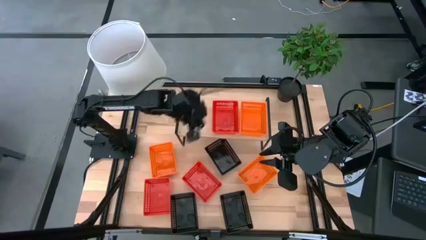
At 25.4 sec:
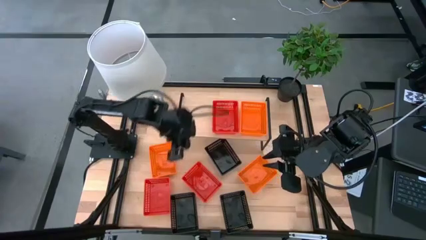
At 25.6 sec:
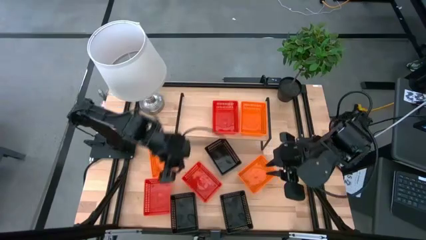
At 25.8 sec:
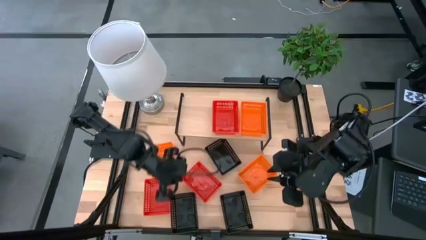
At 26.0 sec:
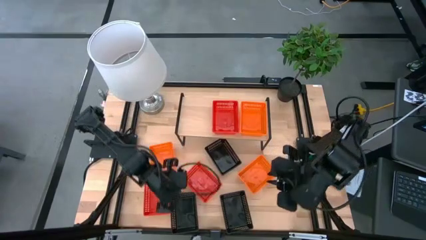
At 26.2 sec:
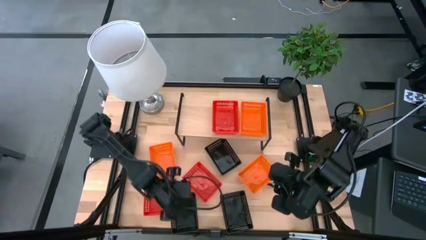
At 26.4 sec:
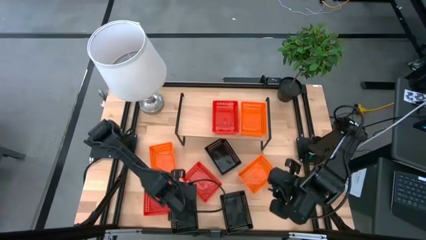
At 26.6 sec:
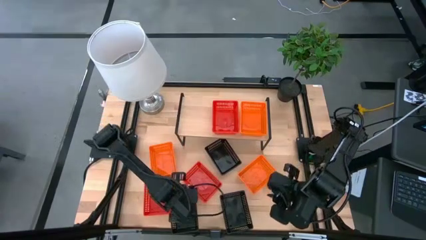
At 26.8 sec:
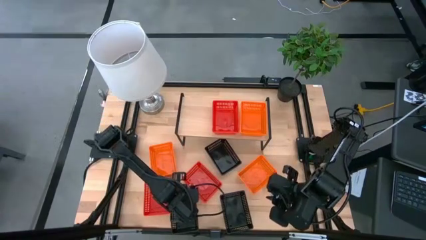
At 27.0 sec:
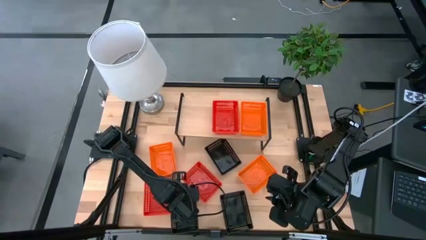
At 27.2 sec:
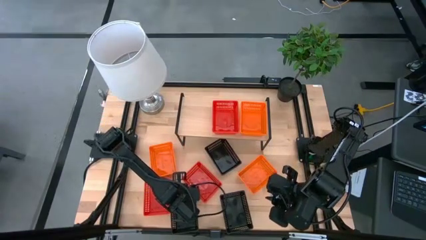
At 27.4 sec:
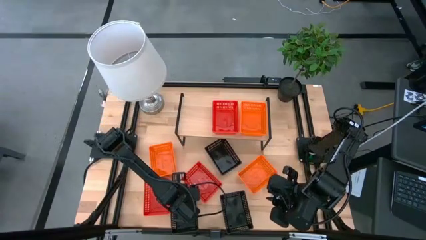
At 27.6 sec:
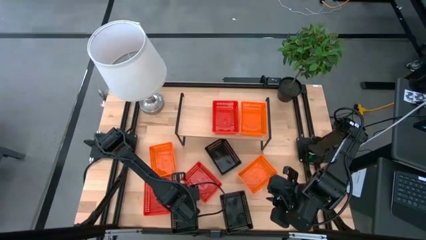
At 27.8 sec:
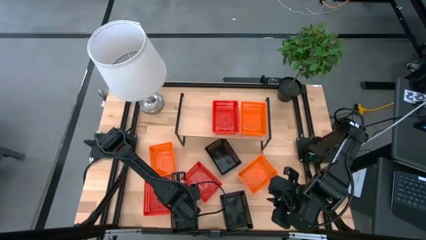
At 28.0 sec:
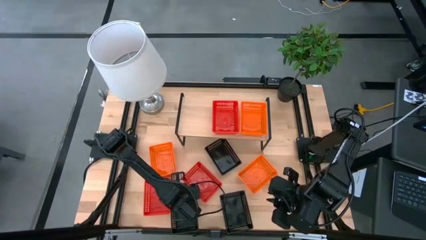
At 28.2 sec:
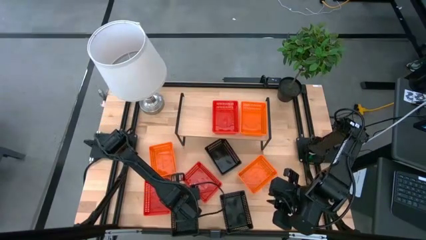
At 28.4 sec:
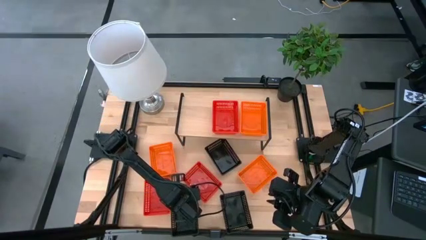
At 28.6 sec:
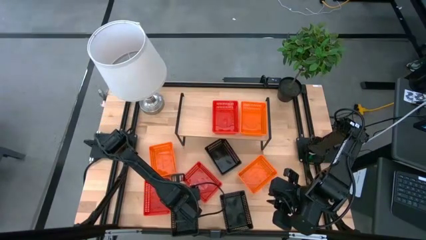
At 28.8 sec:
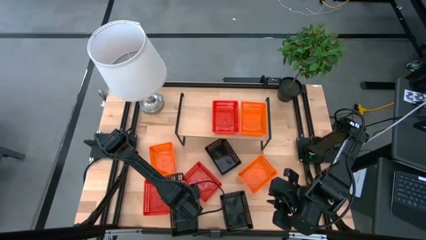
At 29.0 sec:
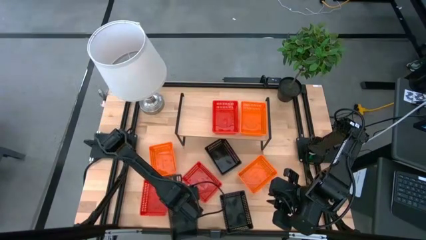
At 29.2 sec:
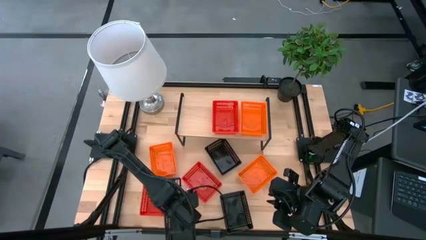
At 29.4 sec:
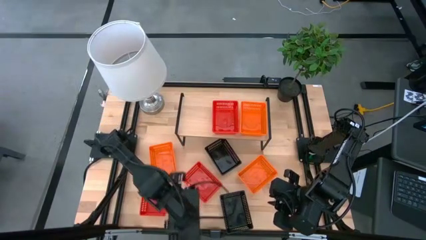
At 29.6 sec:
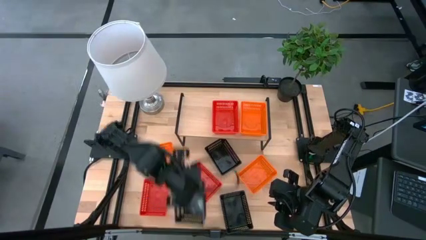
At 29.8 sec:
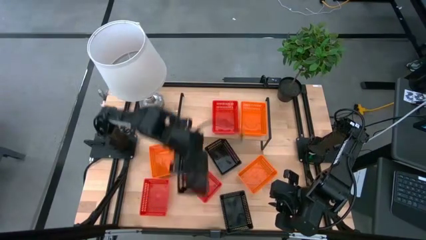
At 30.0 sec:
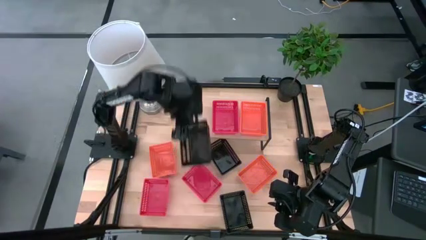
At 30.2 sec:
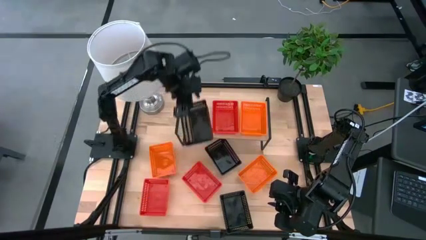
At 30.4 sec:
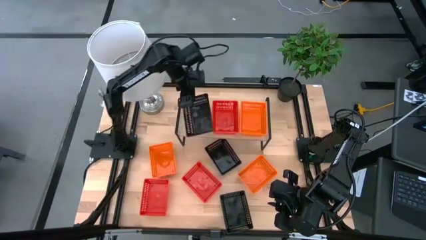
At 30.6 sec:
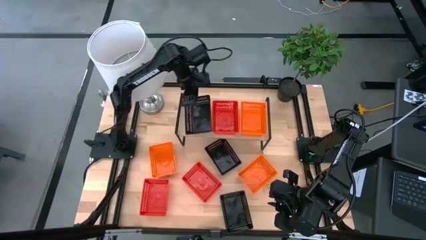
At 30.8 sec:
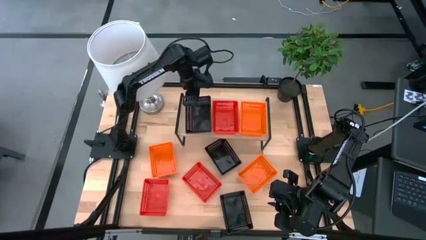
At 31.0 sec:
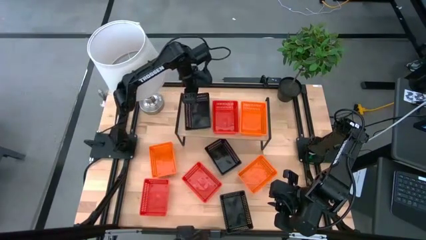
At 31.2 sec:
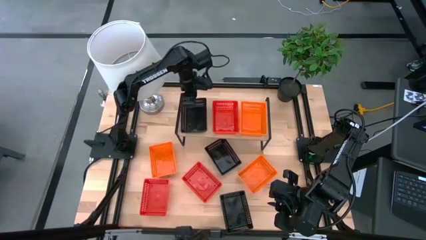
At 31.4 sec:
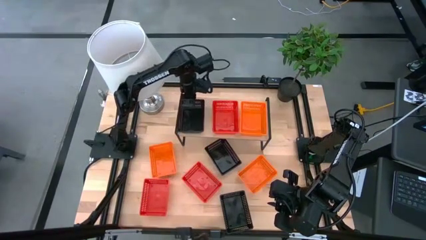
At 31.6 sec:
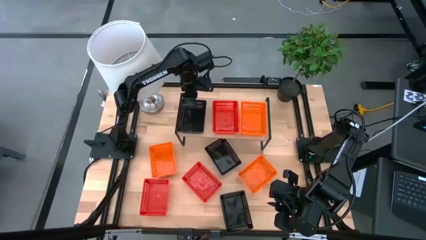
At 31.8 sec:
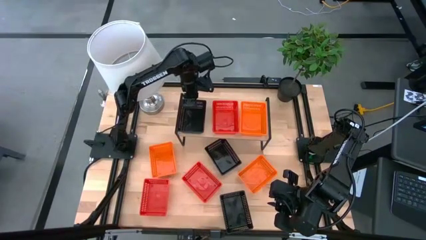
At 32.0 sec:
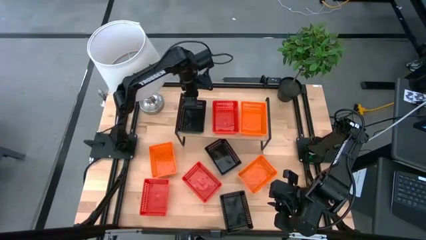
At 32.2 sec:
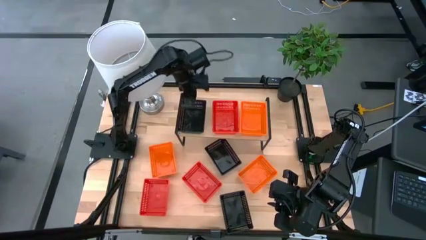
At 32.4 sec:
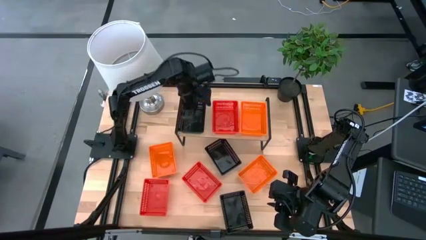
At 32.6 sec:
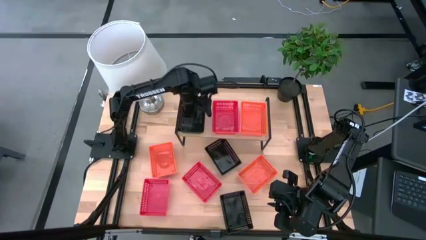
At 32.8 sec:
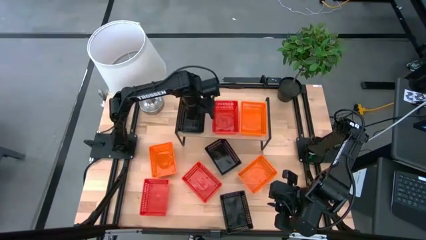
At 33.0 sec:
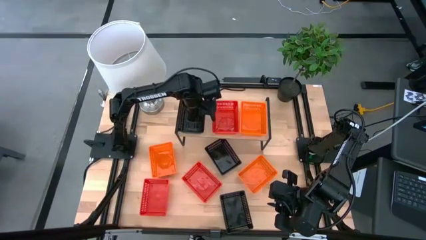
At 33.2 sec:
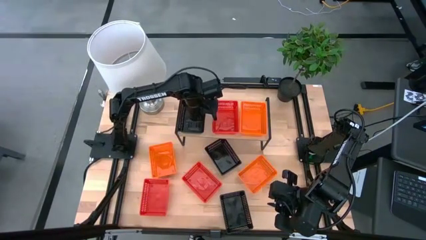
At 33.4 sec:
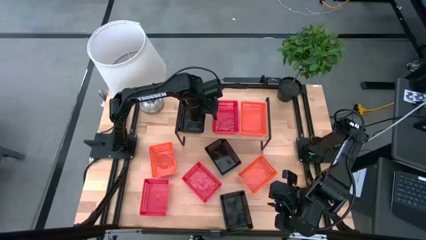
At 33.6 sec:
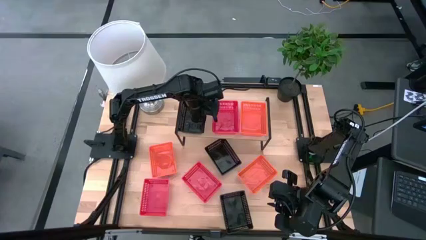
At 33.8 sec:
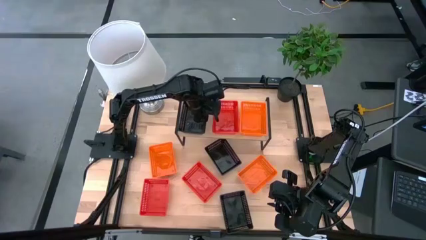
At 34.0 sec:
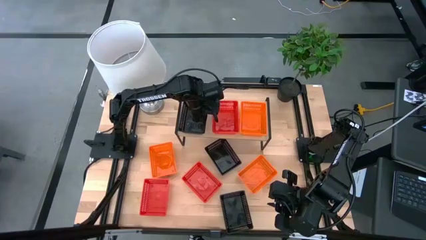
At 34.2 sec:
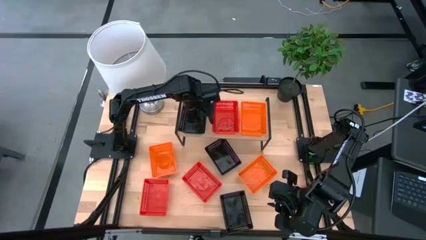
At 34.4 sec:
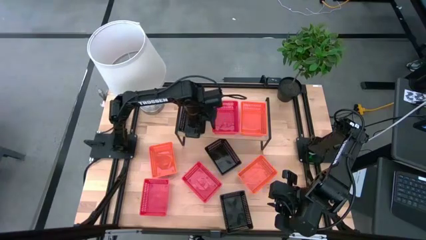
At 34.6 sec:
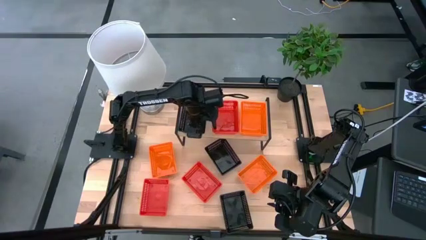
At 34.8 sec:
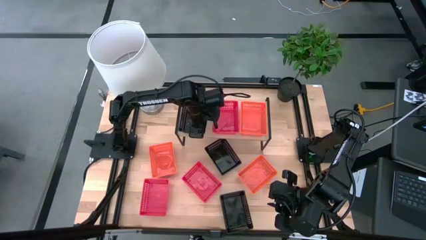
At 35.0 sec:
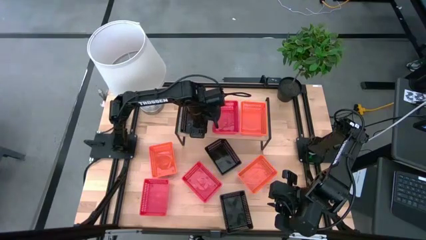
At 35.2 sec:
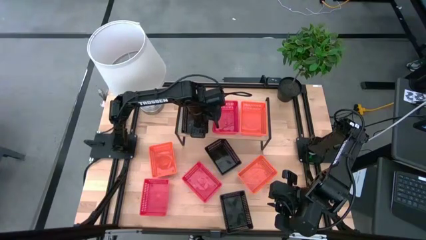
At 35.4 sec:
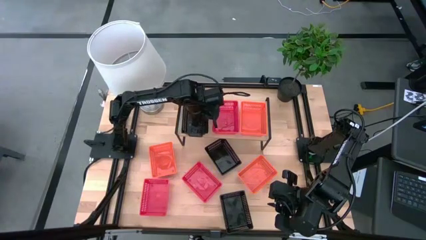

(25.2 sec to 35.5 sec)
Task: Stack baskets on shelf by color
Put the bottom left black bin on the shelf

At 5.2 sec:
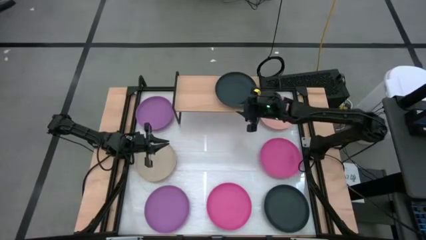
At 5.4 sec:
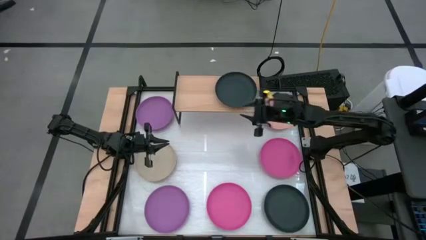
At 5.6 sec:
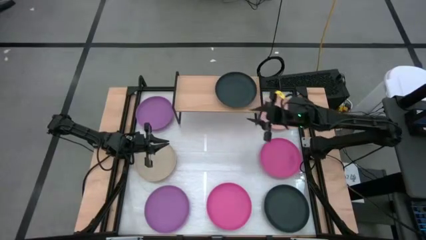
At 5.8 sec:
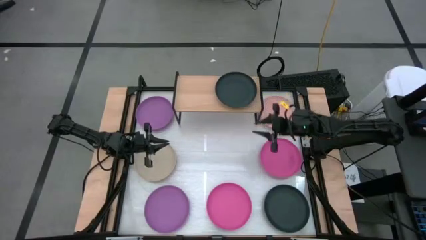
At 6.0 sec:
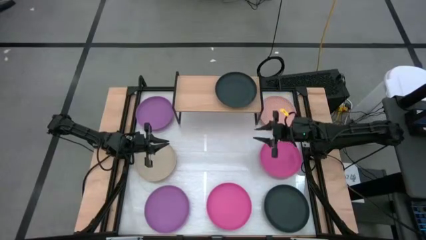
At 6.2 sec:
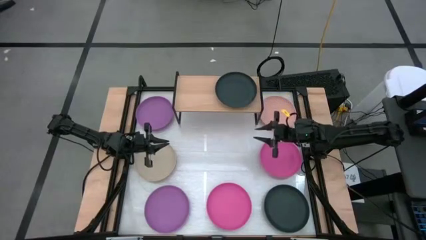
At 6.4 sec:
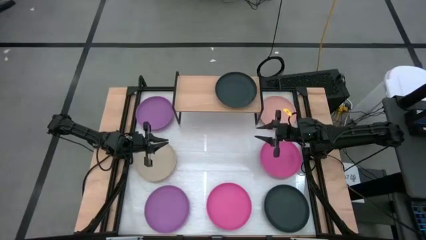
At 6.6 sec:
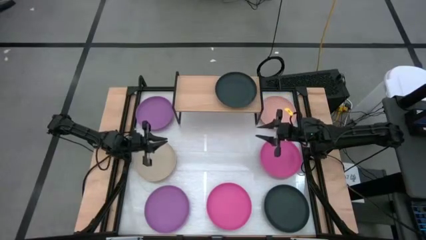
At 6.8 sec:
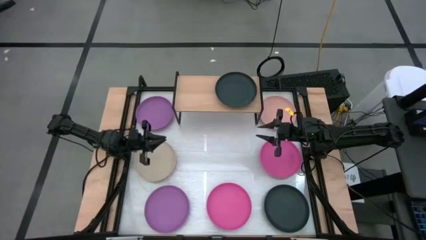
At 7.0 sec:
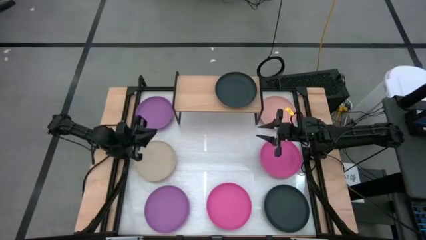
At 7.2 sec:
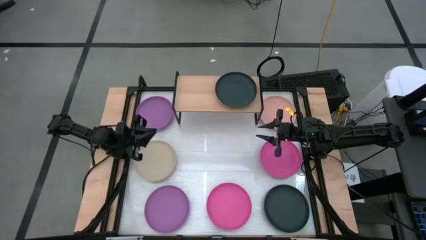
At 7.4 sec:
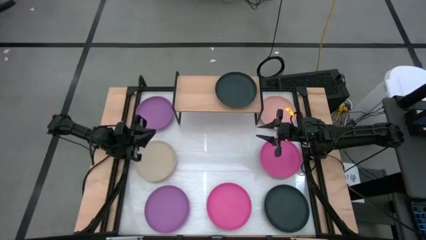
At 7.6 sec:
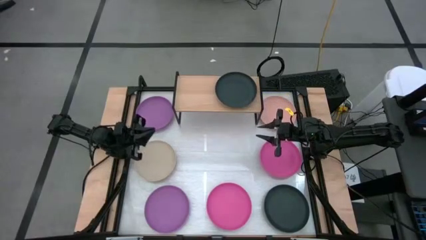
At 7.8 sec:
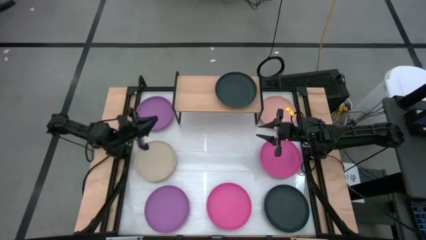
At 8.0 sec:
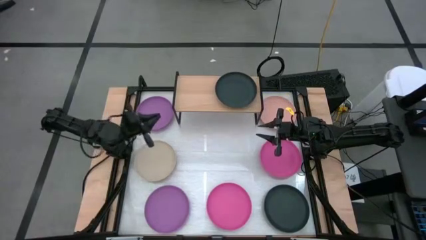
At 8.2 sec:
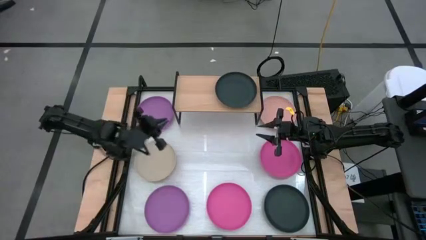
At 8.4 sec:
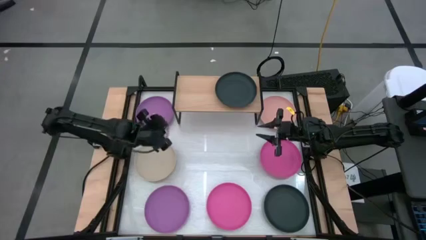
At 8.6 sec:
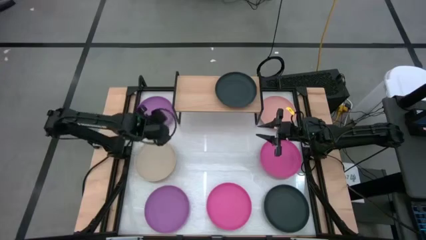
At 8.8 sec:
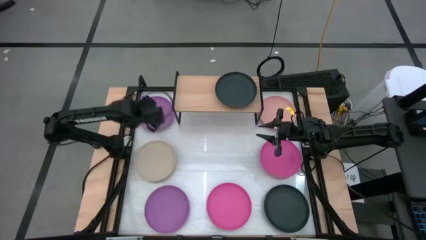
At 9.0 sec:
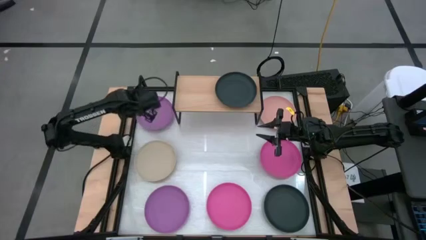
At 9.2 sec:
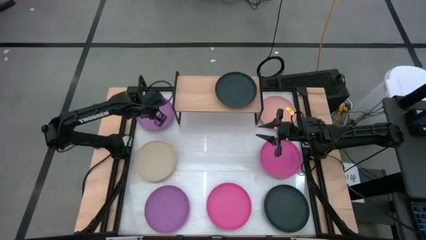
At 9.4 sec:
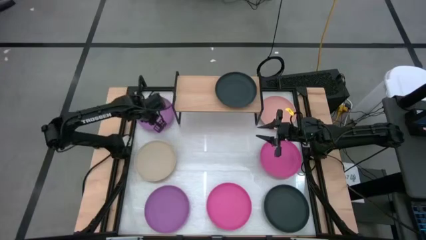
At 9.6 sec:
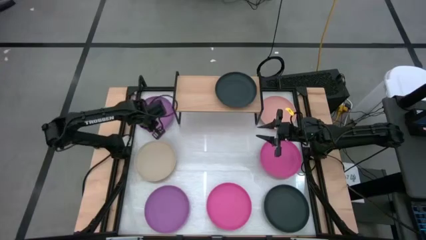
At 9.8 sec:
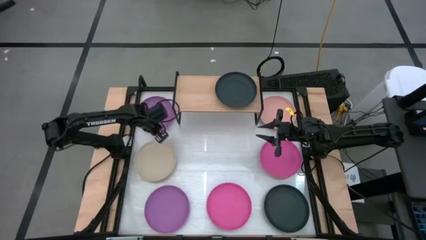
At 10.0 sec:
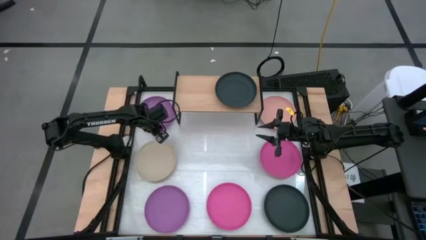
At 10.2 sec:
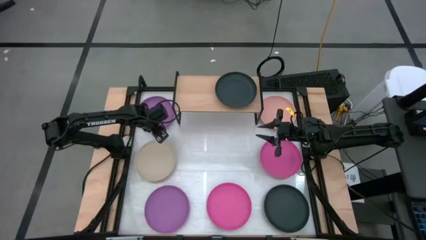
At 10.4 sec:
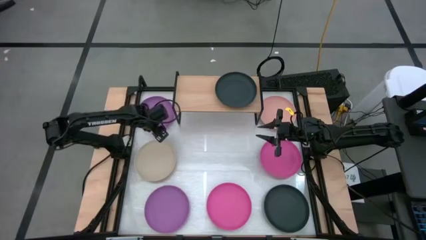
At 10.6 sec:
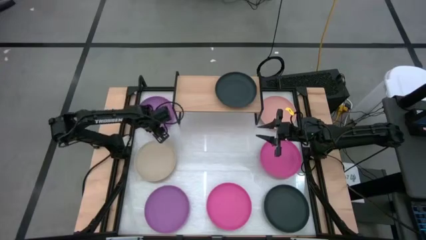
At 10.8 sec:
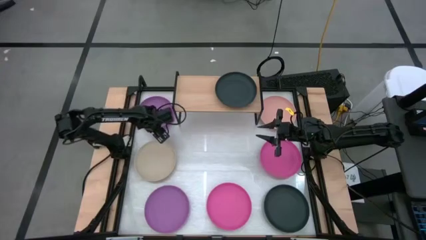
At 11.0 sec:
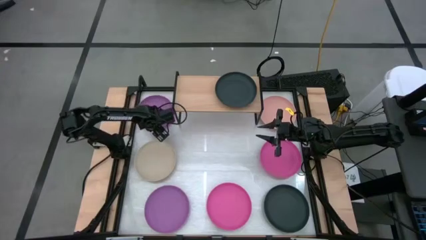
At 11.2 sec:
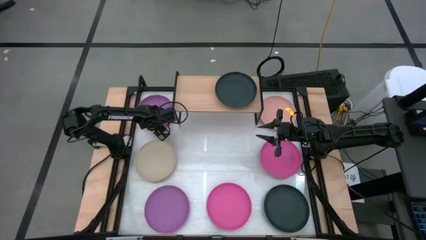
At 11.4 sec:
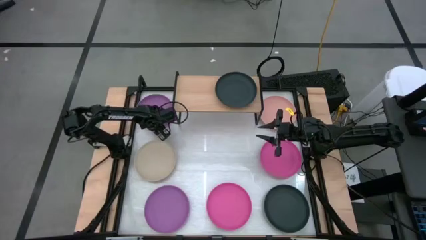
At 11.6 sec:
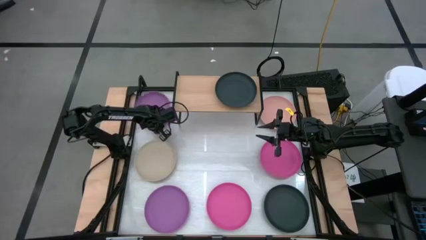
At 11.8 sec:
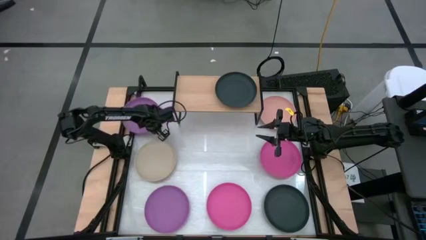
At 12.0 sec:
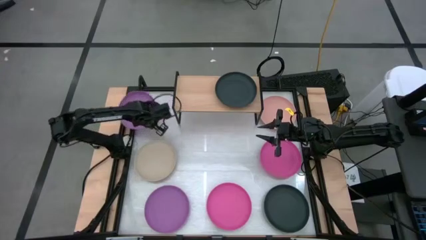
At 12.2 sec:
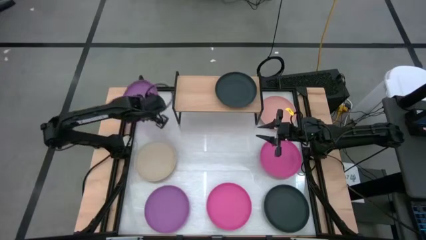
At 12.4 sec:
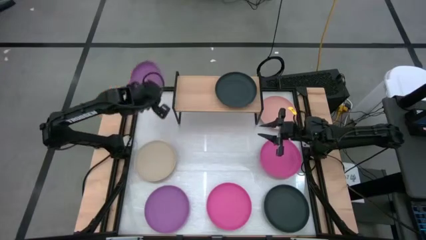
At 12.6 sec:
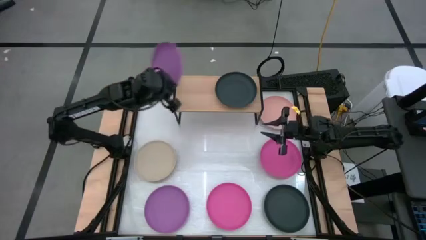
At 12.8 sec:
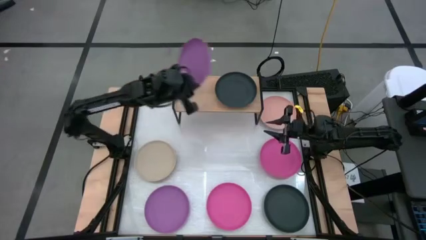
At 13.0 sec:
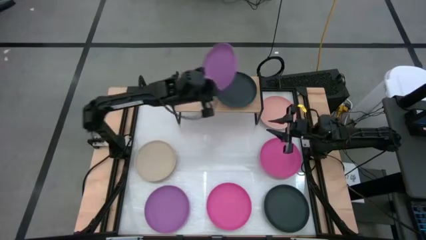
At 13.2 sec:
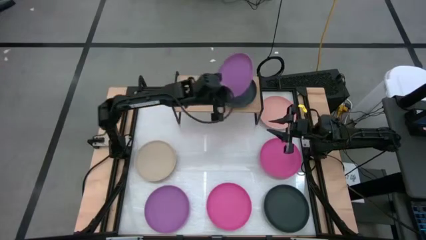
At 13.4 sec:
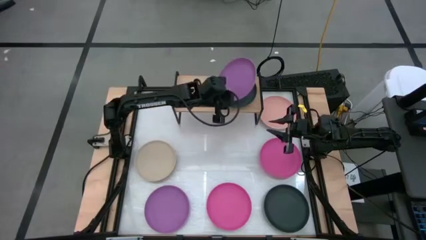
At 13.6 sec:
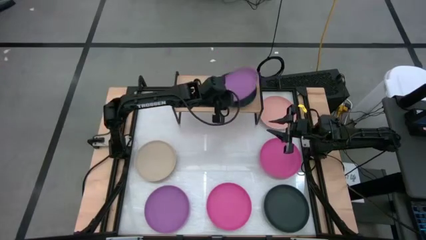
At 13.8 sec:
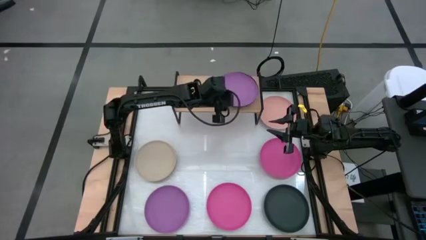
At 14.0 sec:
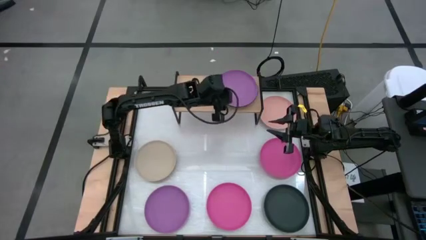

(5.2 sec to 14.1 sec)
Task: Place and stack plates onto a shelf
Stack the top violet plate on top of the black plate on the shelf
